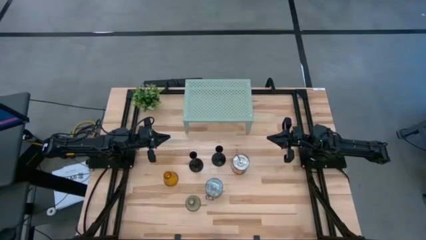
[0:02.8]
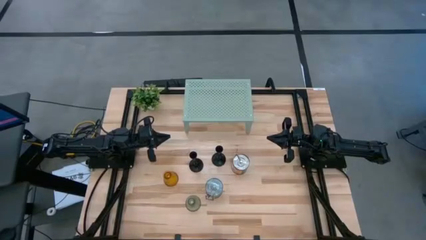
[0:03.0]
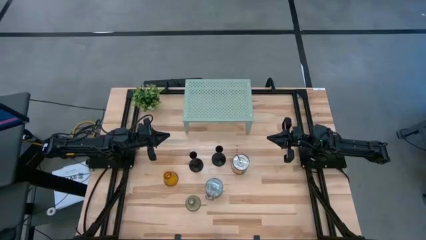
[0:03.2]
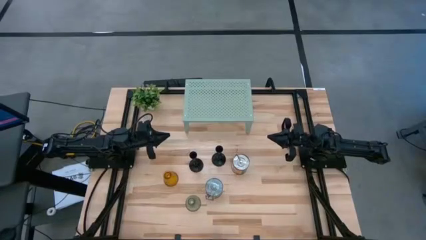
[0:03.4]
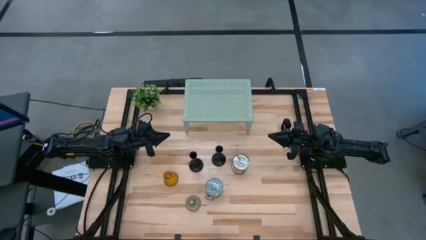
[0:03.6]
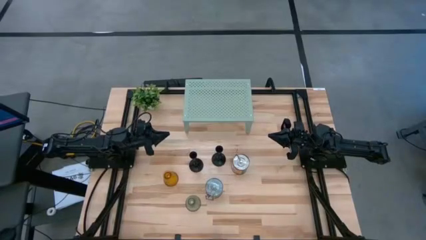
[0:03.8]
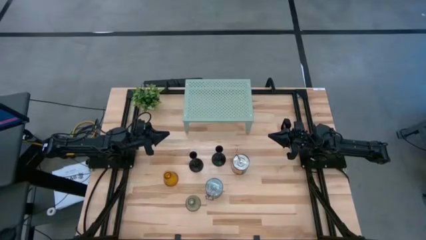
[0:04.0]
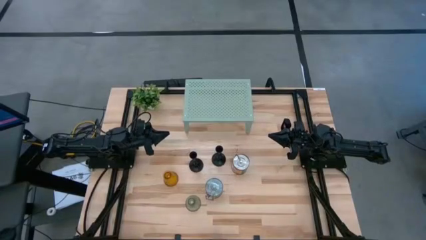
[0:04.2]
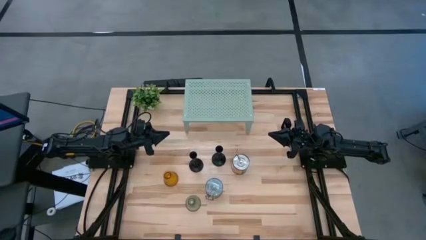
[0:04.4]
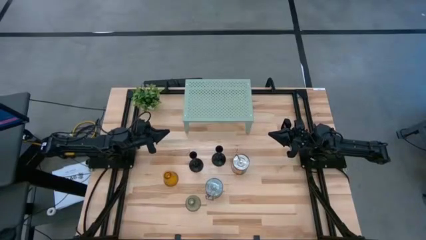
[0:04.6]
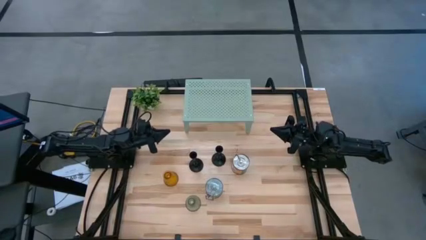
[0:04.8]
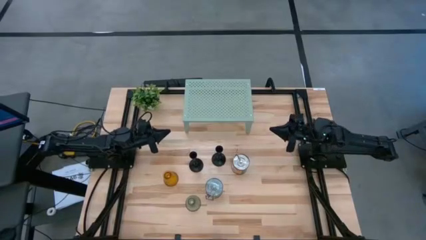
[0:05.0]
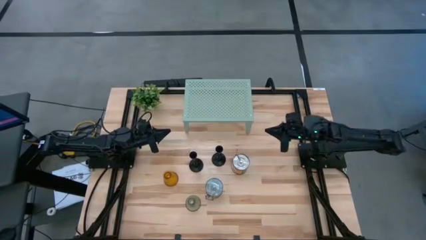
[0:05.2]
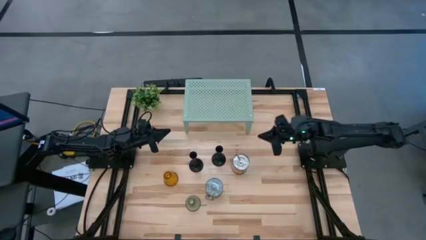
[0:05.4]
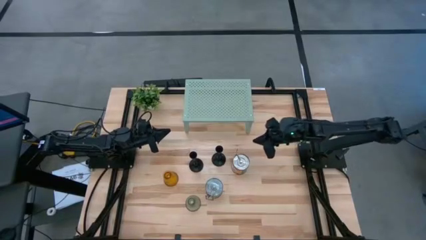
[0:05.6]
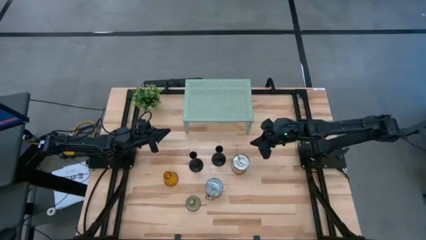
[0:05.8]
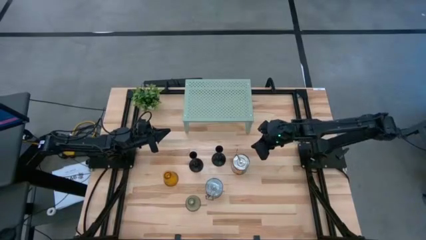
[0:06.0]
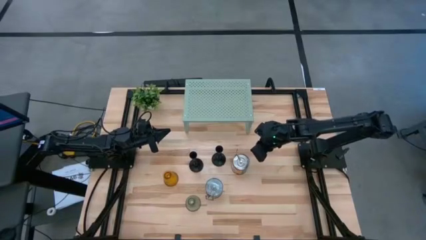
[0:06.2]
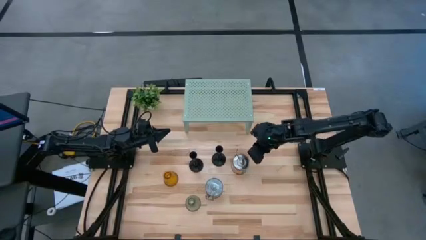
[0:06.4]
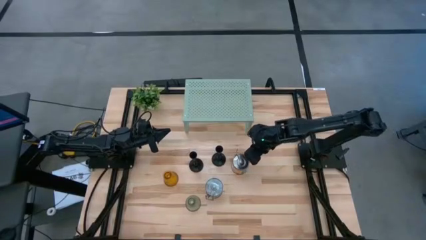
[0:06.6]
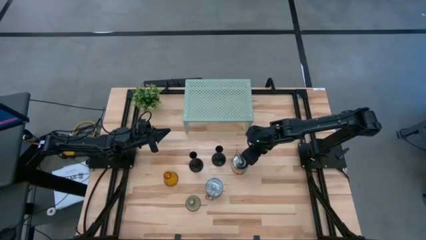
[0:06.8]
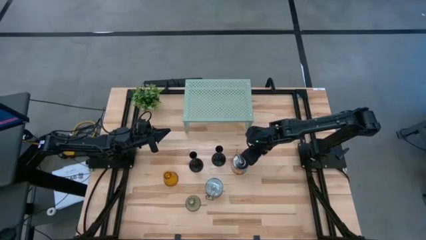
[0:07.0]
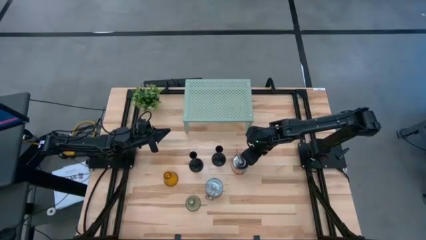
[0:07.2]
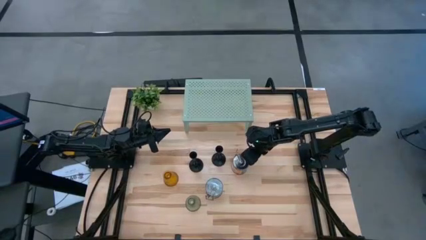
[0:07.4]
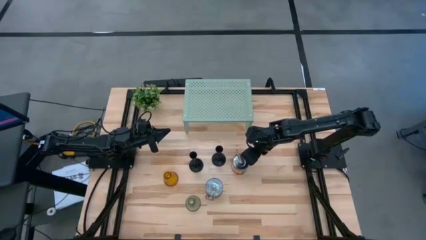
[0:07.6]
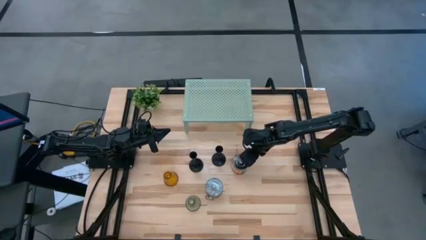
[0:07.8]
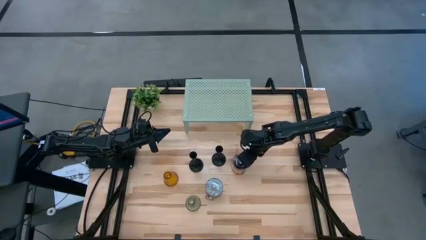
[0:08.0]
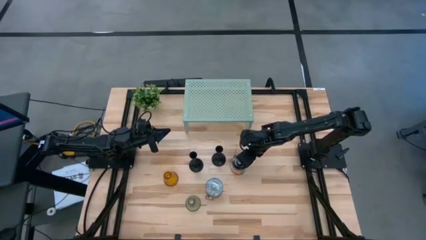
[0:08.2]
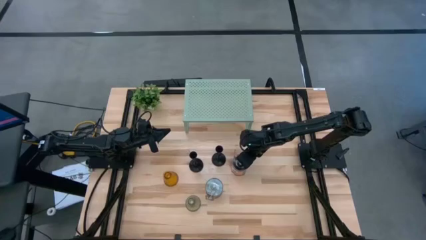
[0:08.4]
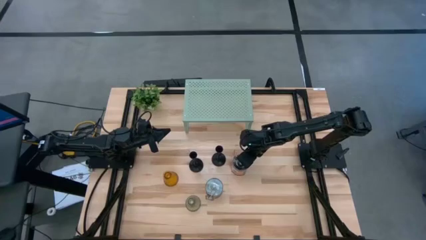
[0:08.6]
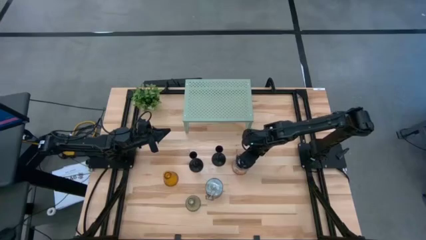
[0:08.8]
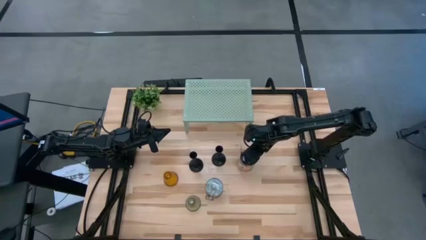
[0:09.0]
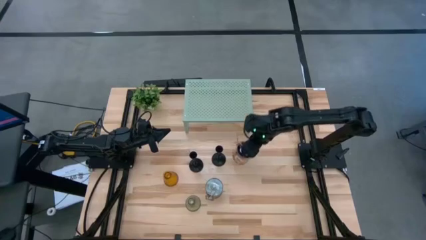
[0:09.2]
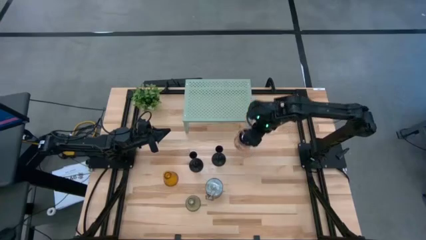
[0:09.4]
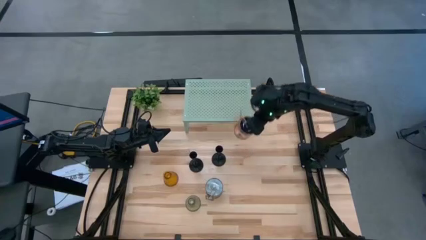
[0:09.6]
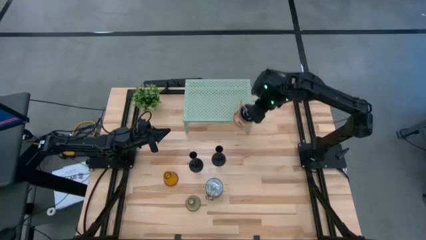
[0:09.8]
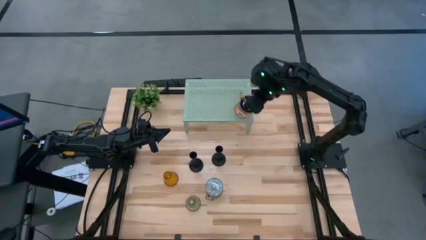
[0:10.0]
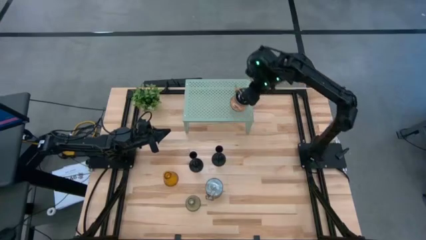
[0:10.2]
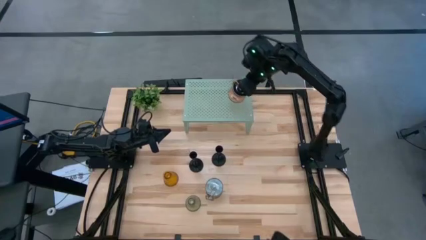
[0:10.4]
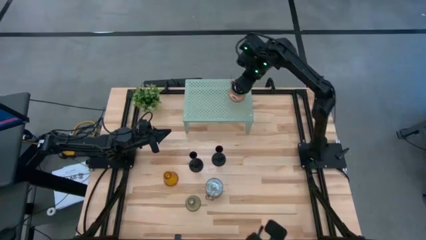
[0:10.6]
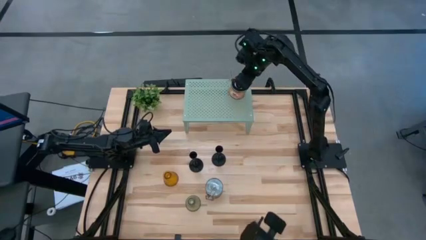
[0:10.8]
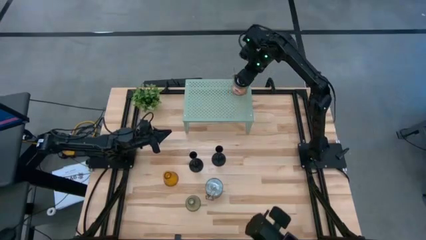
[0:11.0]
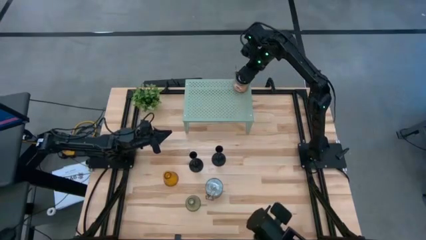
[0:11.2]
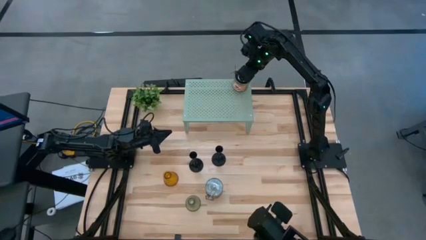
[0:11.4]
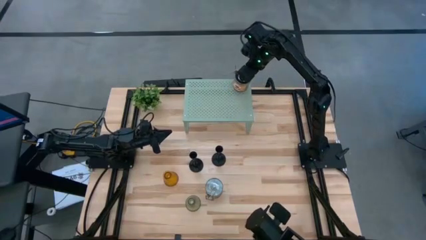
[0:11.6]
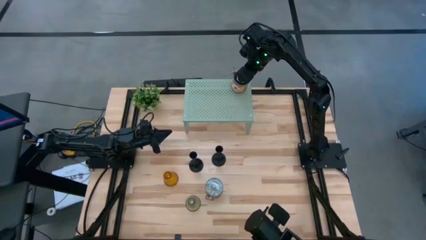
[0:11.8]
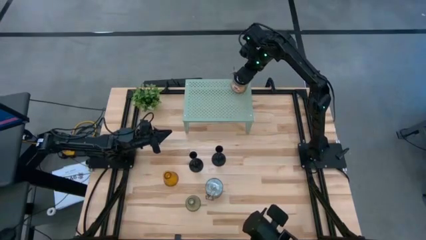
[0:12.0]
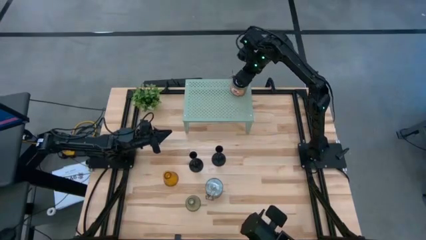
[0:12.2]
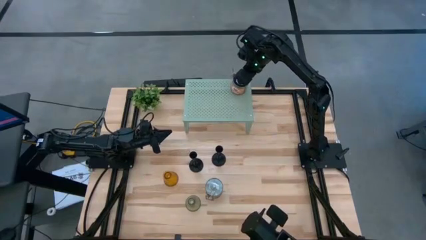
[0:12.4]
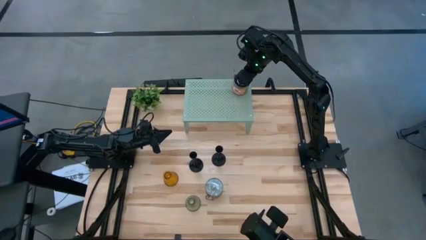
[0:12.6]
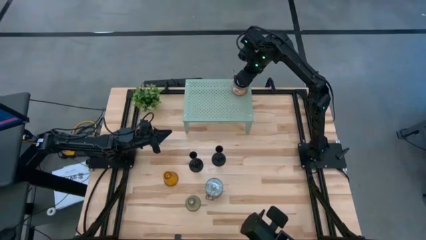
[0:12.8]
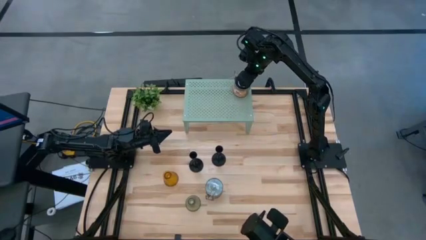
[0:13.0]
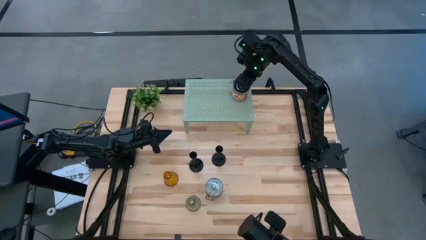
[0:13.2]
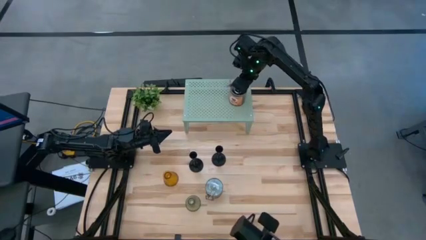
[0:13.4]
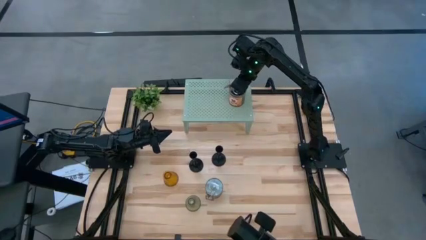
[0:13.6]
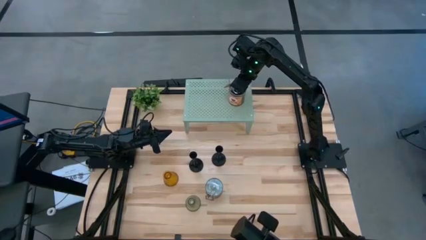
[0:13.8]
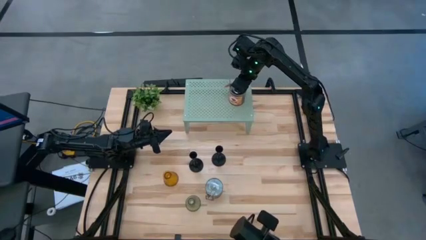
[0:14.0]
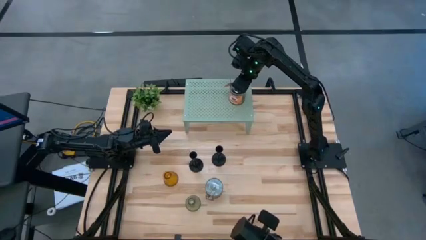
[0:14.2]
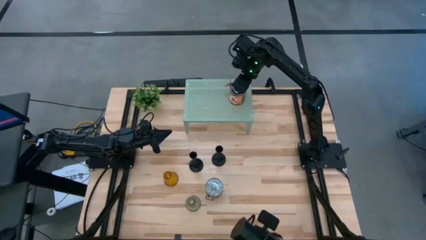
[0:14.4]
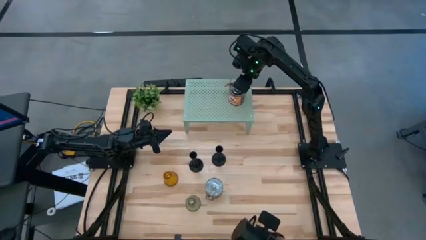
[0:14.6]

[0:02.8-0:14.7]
Task: Pick & Place candle stick holders
Put the top scented candle on the shelf
